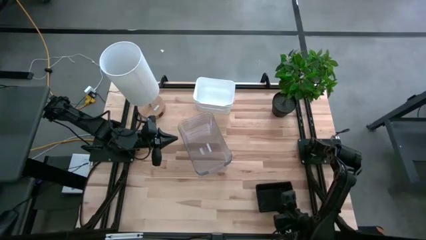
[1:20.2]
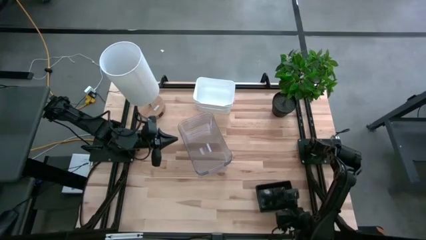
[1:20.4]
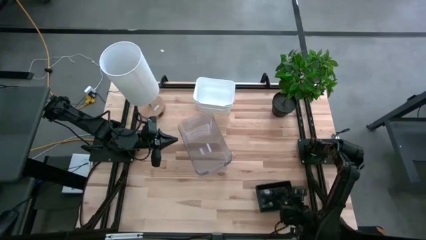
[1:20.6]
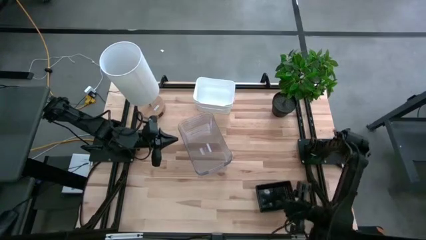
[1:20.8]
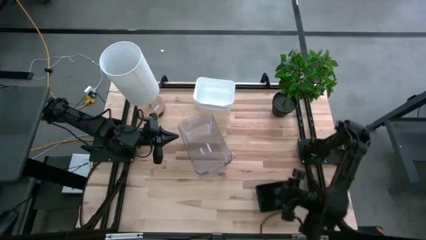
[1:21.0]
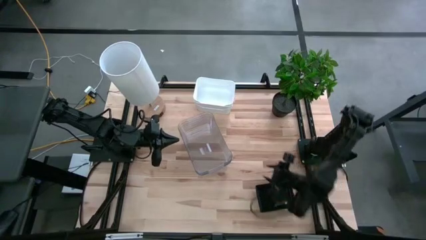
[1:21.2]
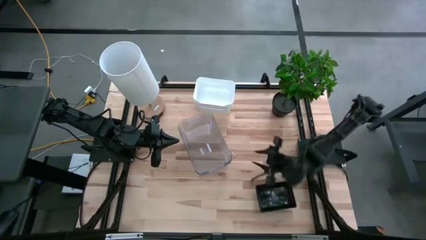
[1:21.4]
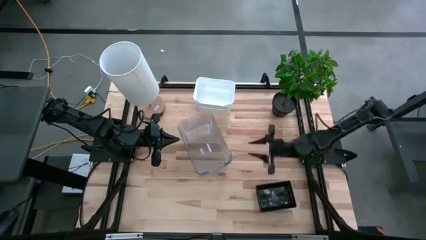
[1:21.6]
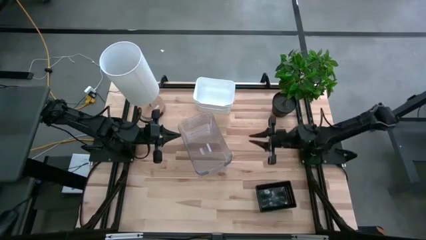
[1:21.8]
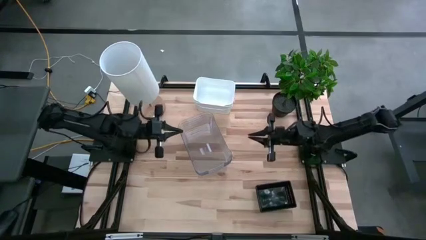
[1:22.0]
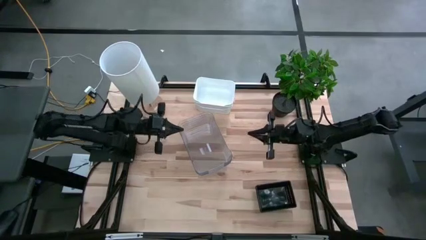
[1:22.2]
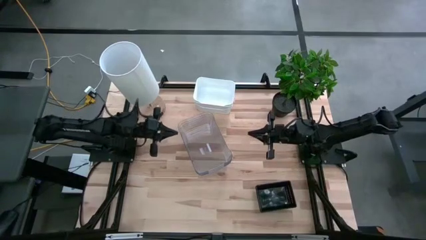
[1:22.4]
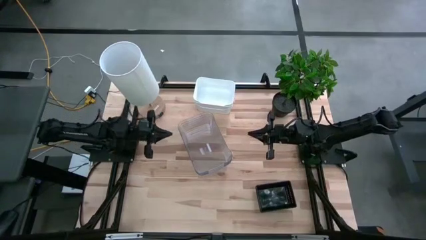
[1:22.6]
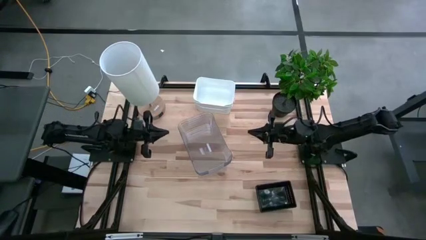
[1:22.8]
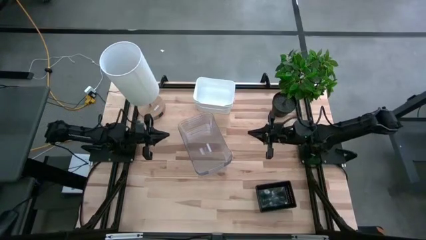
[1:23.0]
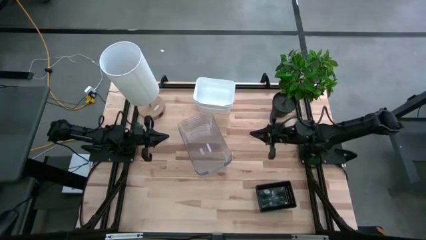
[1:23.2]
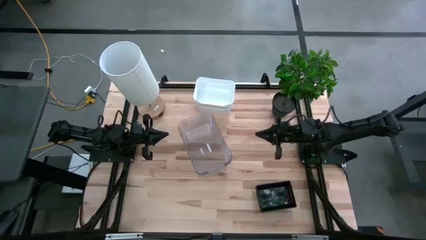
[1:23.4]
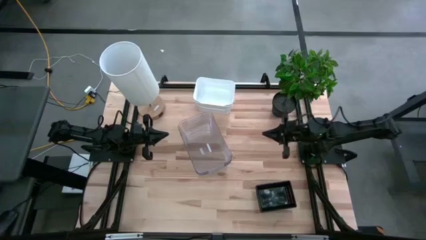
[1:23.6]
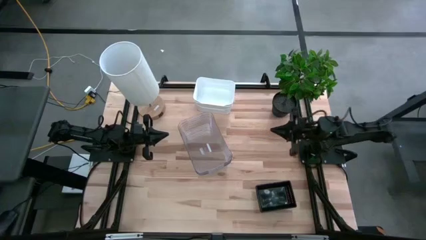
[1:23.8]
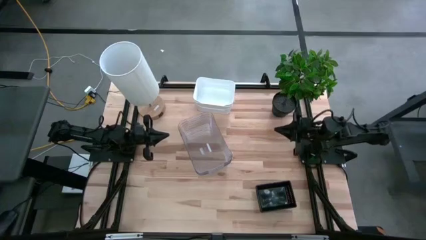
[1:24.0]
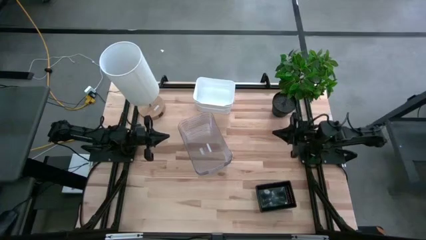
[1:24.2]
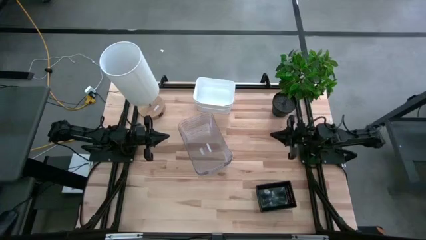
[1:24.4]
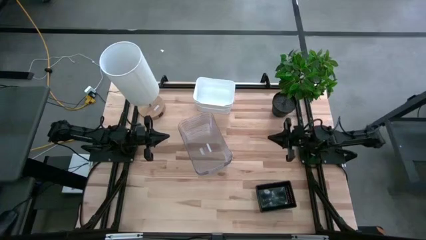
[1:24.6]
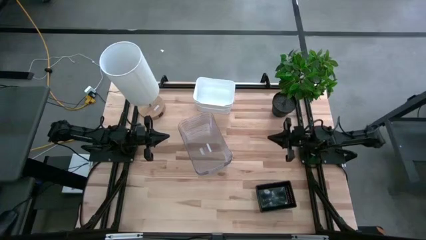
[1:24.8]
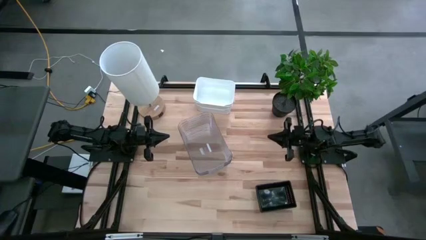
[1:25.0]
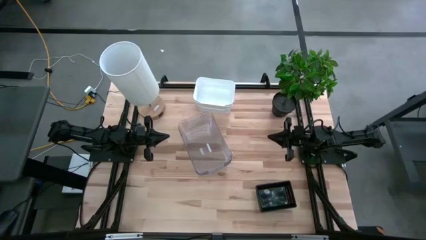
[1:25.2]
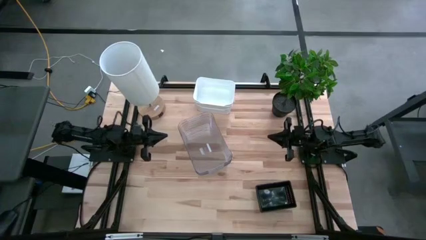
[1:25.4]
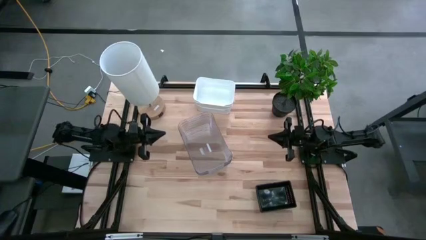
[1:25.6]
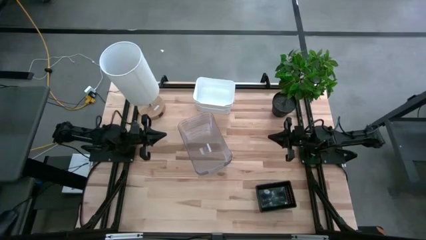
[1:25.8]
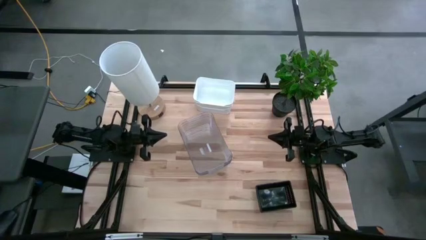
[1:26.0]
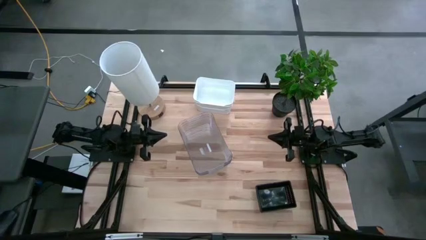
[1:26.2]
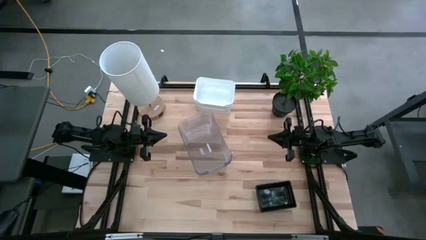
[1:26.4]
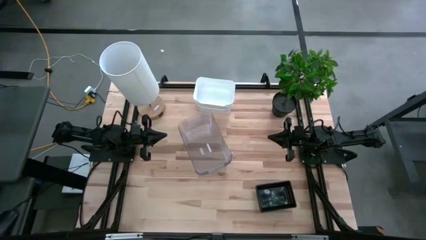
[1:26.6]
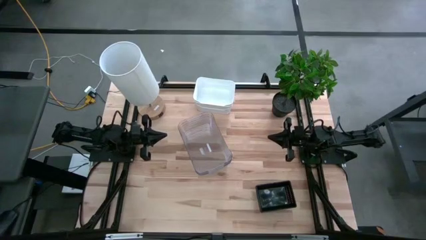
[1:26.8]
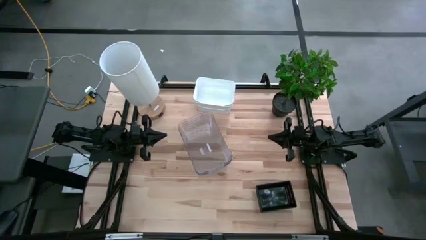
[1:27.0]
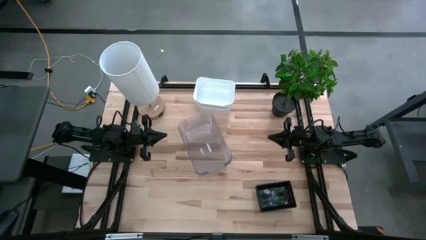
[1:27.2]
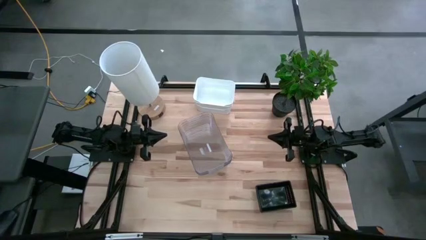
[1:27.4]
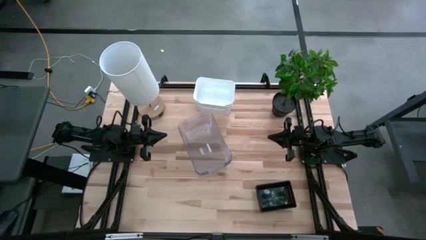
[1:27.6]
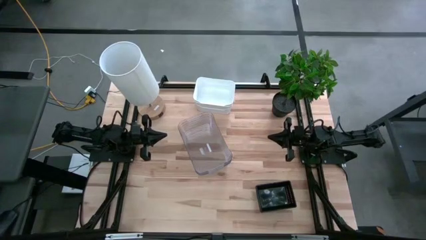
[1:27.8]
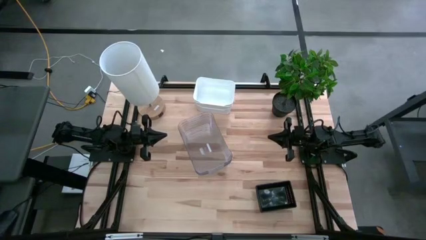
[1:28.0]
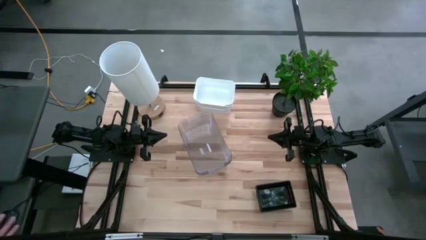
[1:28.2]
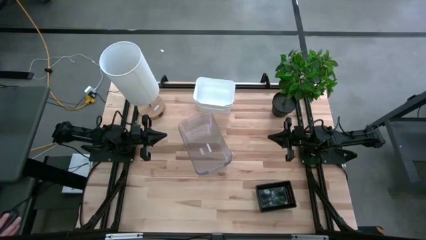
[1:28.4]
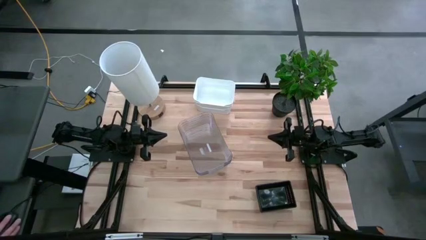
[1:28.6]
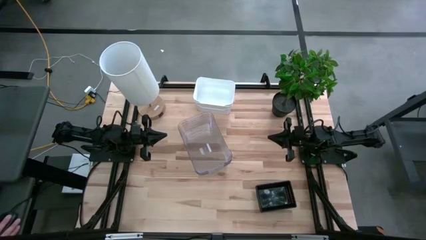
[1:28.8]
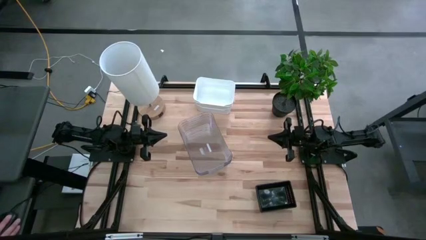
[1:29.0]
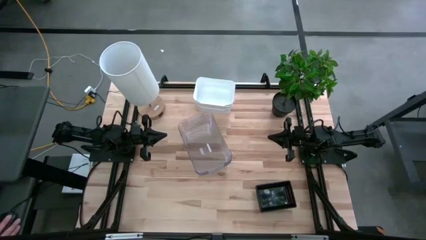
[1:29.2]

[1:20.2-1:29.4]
Return to Home Position

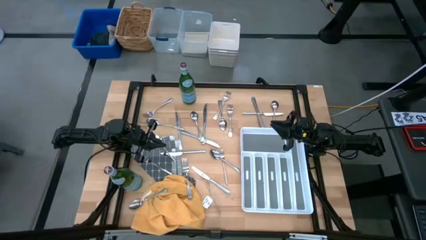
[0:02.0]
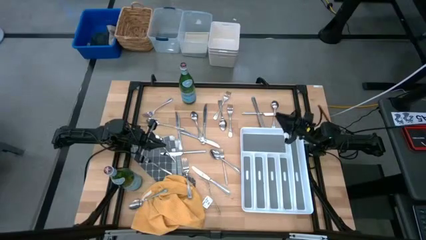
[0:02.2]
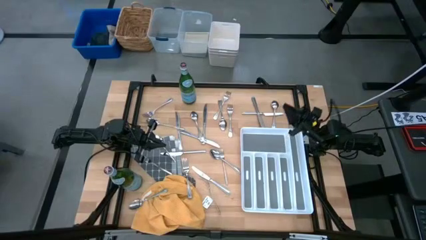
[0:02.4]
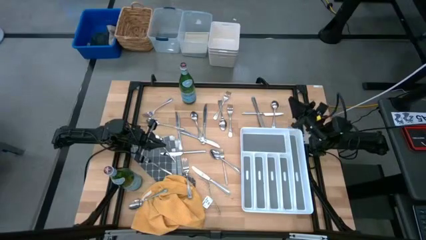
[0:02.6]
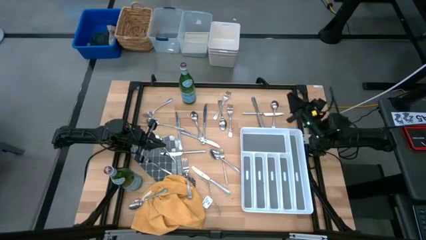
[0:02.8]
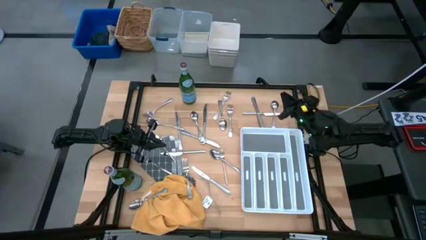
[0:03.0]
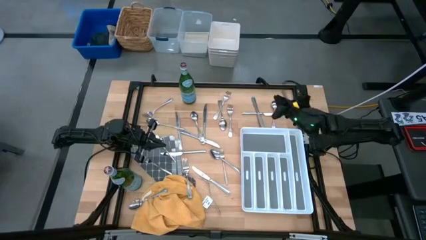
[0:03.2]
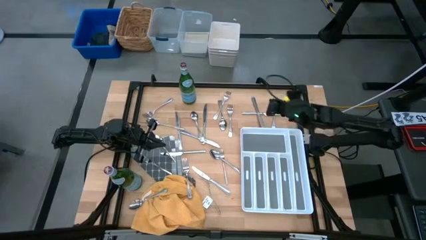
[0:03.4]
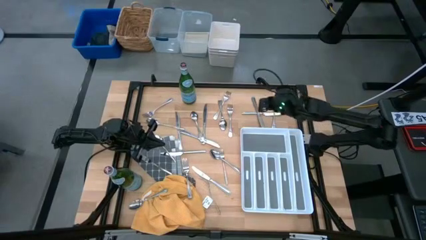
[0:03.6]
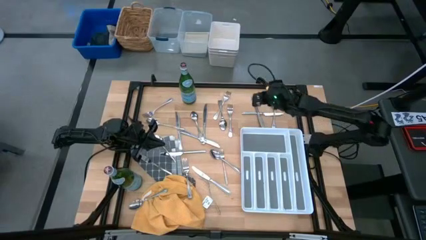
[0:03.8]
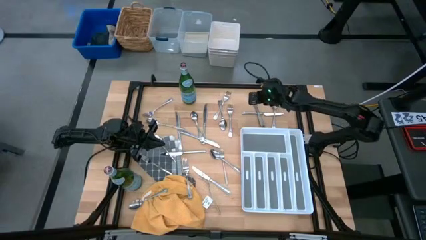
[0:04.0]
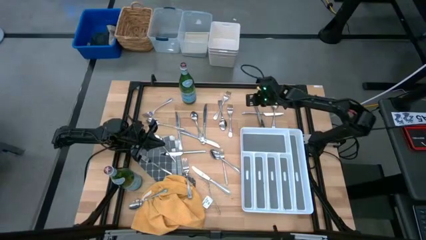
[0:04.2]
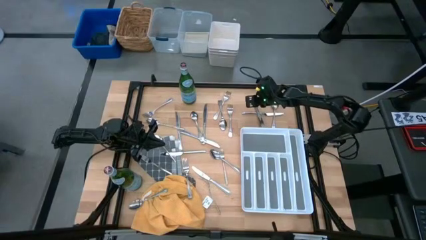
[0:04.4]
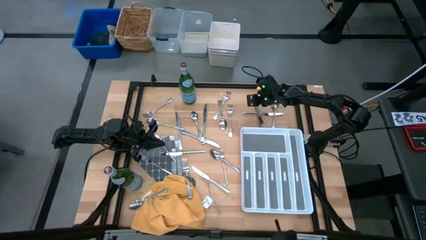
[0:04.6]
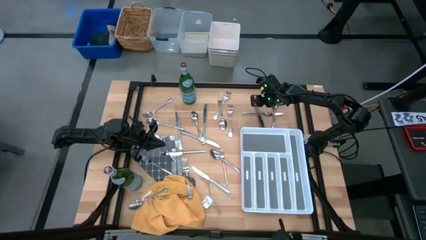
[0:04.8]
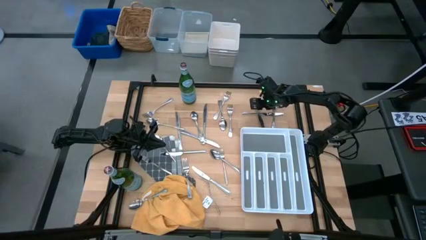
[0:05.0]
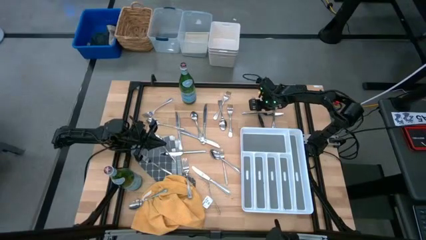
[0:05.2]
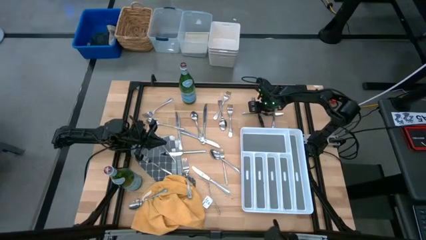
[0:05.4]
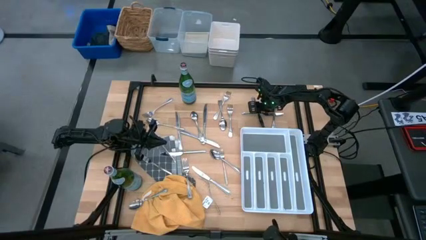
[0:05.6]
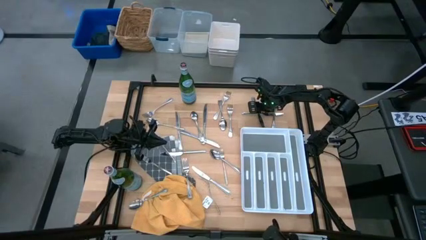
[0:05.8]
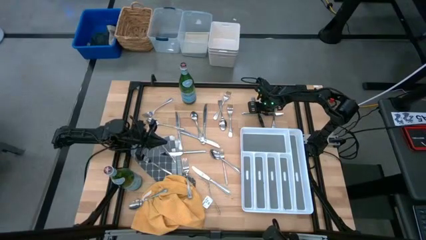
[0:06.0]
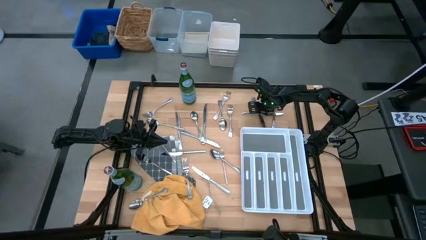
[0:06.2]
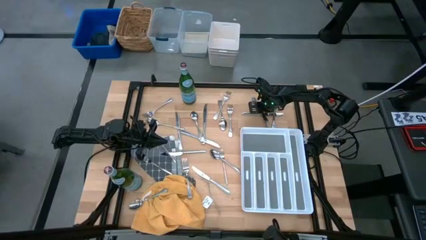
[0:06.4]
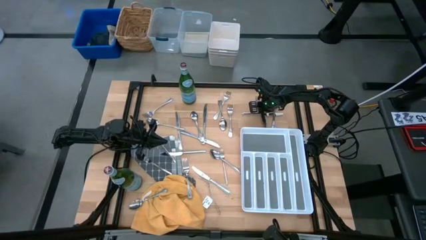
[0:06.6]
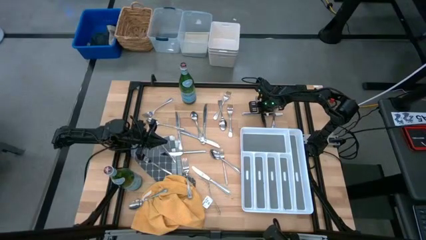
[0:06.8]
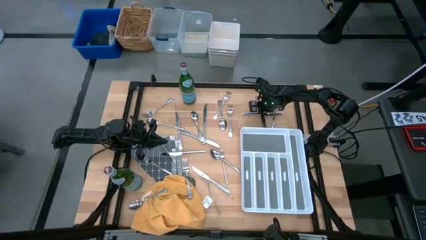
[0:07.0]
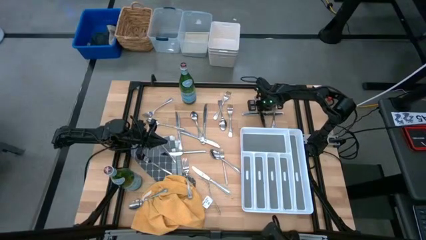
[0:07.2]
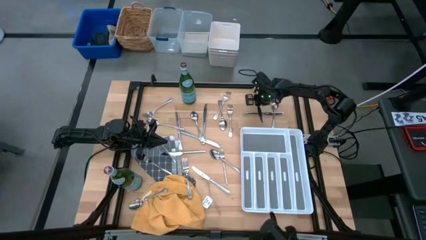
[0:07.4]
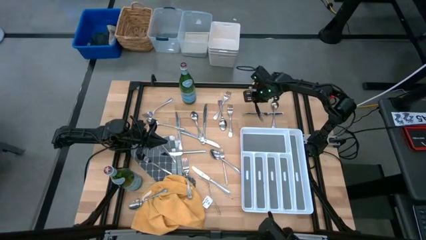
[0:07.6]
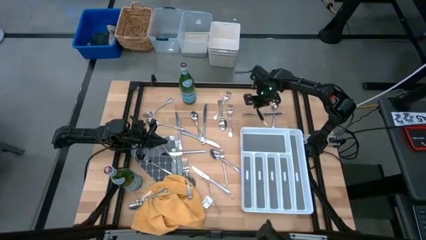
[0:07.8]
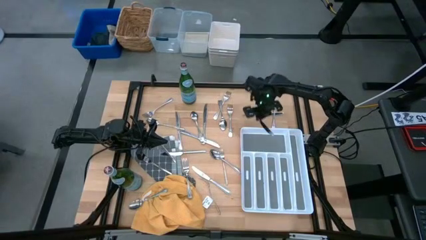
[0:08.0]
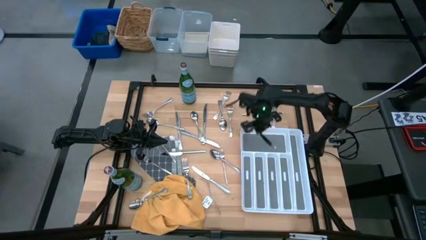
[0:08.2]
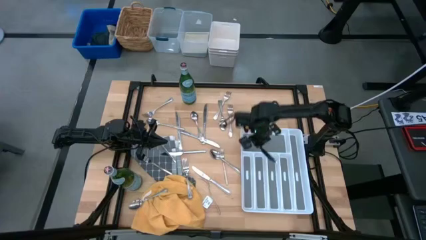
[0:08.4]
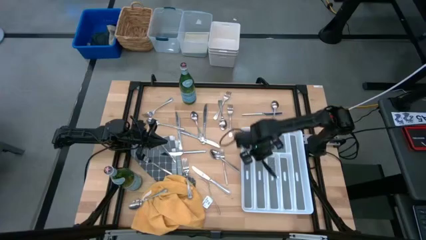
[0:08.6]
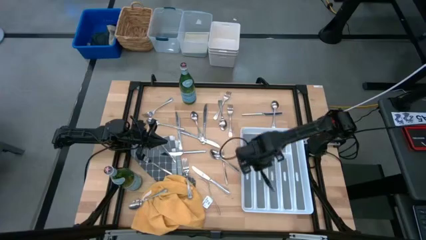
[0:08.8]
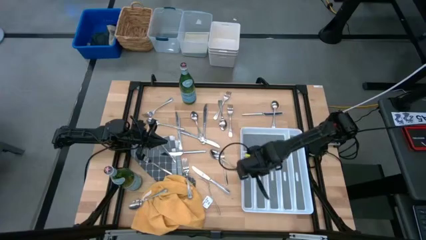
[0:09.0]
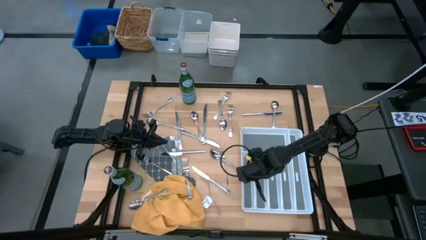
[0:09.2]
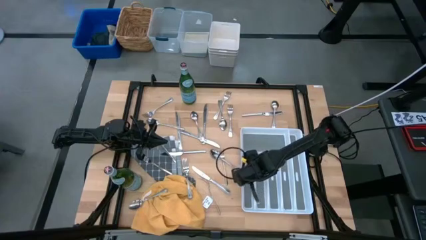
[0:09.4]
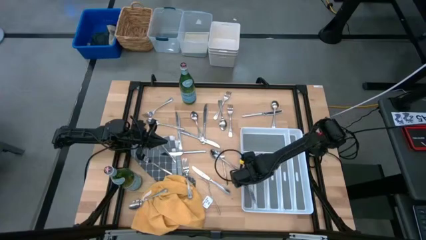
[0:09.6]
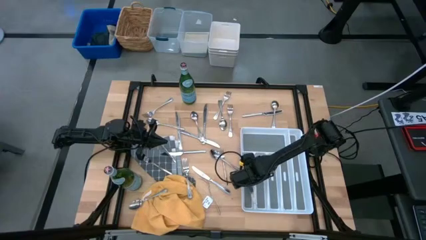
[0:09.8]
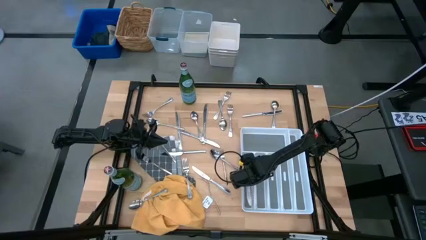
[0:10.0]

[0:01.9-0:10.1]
Put the silver knife into the white utensil tray
